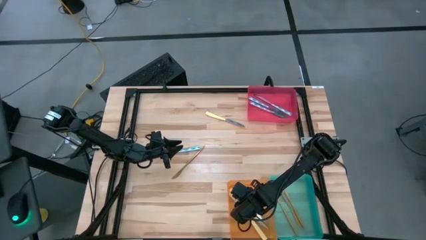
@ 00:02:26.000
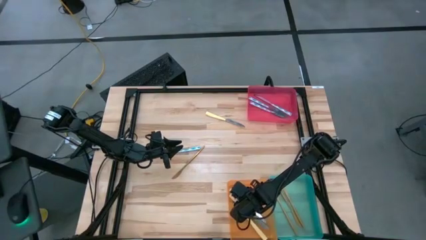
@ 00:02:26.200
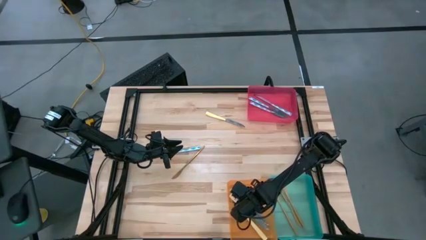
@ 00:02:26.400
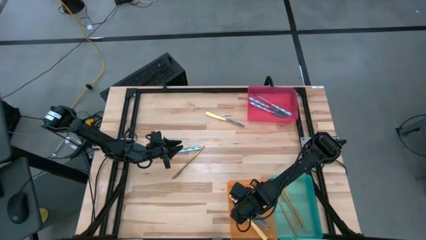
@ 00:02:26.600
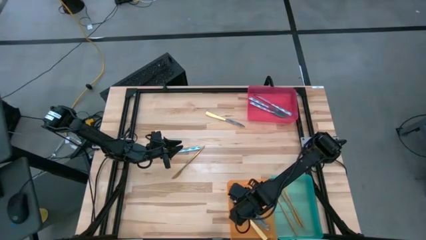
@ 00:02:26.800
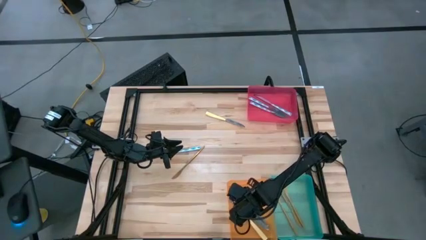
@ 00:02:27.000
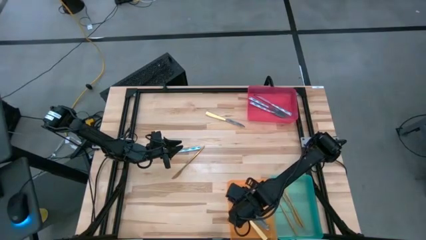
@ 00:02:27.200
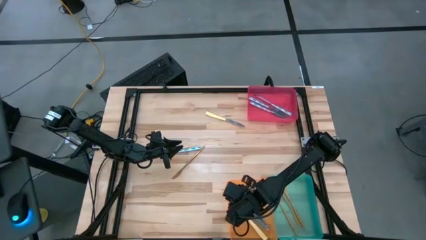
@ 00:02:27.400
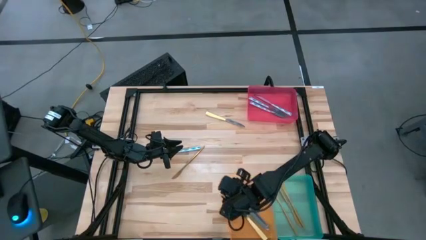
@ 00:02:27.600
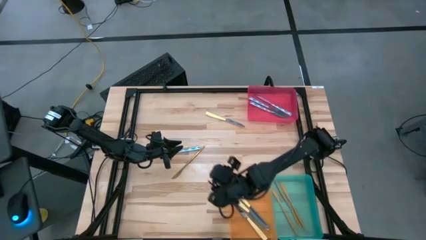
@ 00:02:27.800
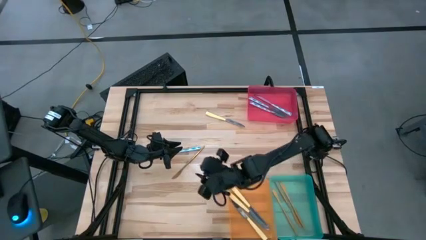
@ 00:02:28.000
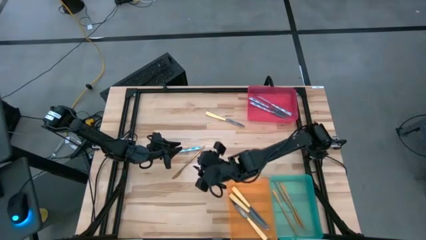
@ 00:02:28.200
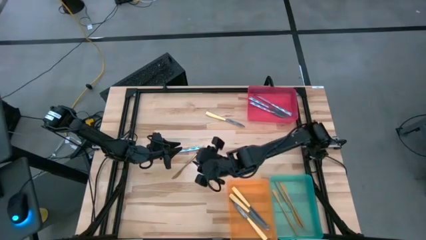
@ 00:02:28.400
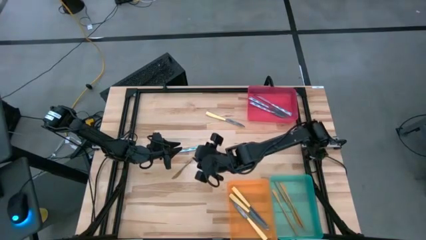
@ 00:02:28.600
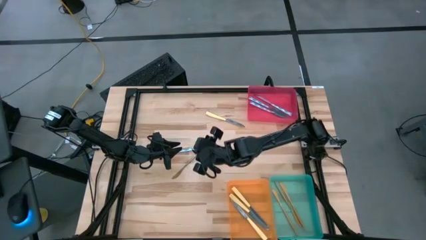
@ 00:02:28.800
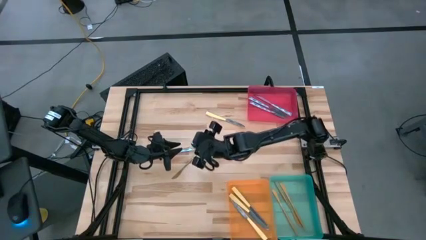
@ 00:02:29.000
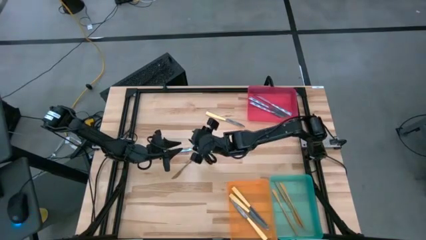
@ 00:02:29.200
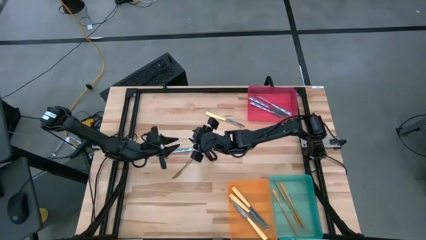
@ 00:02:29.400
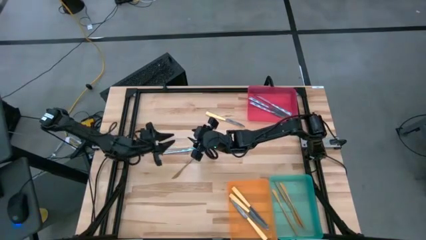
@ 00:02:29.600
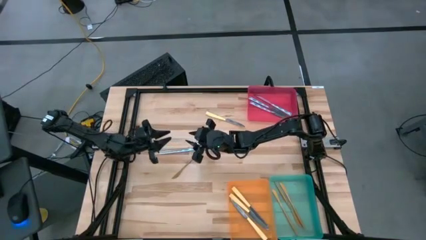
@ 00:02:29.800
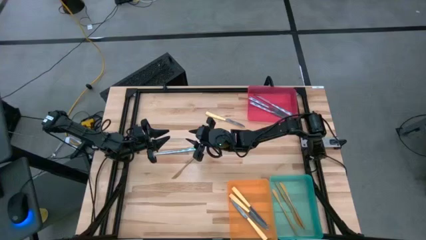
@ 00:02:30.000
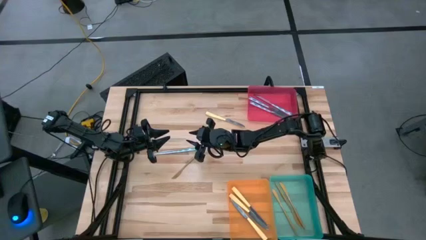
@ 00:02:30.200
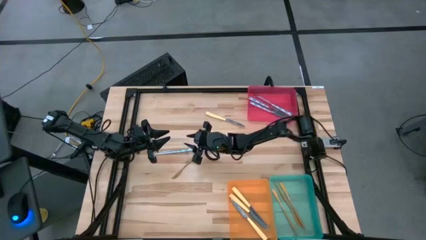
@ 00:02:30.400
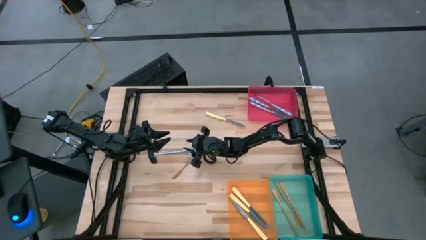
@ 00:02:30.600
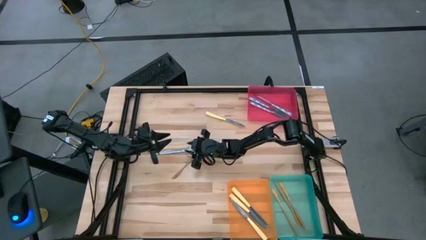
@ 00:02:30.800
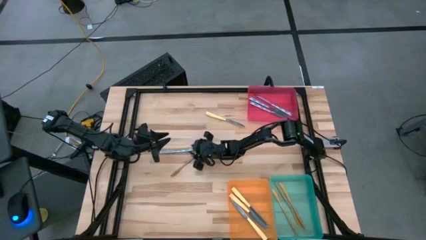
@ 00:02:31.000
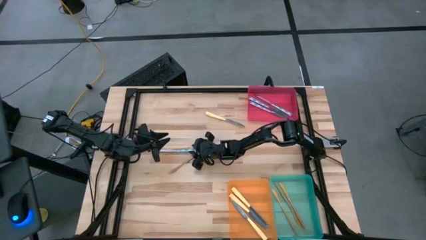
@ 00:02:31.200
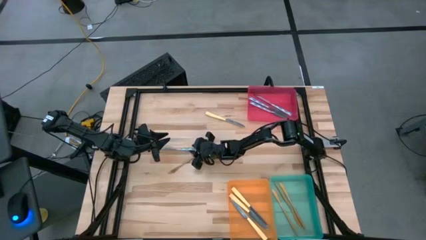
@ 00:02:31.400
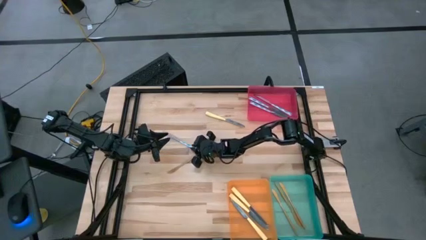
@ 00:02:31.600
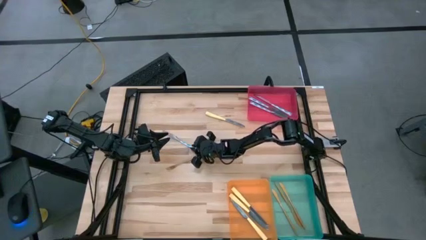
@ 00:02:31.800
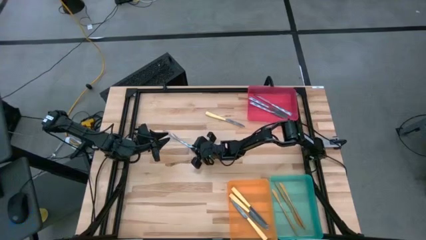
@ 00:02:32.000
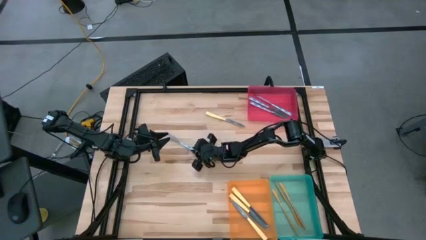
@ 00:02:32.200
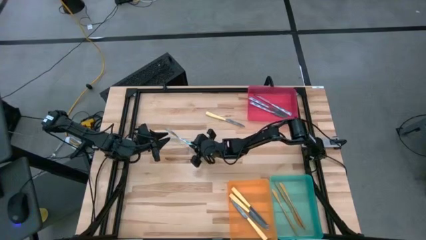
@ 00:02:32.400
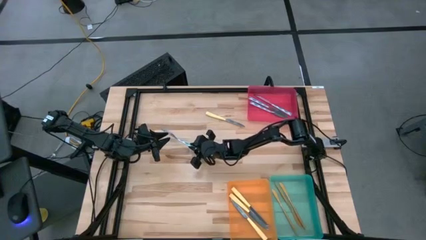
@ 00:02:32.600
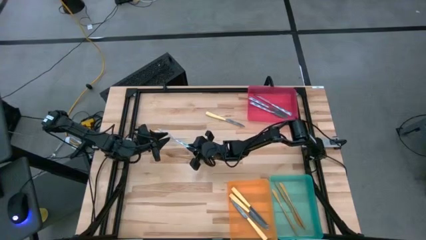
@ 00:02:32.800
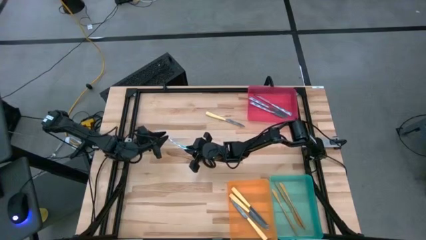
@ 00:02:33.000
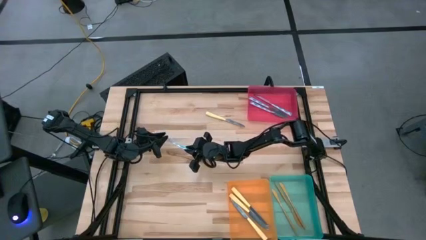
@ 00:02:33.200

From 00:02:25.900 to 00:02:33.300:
Task: Sort silverware by color (type)
Put the blue patterned knife into the red bin

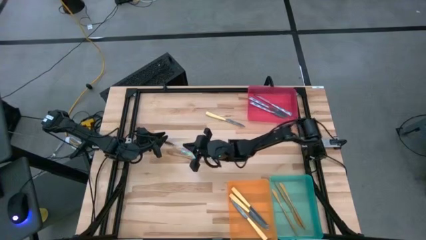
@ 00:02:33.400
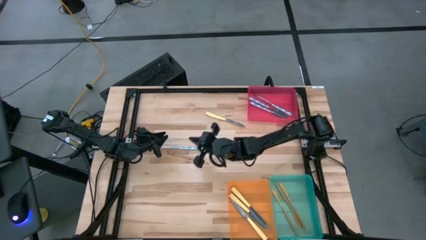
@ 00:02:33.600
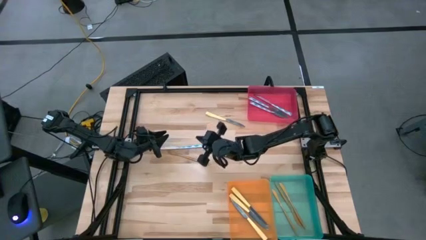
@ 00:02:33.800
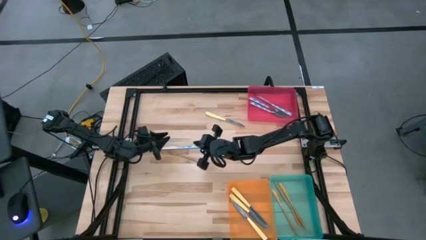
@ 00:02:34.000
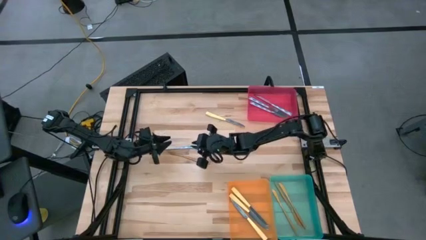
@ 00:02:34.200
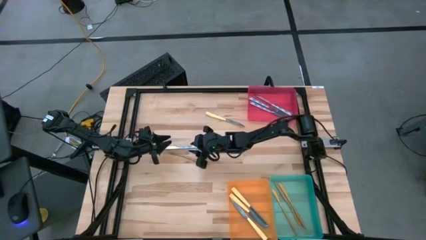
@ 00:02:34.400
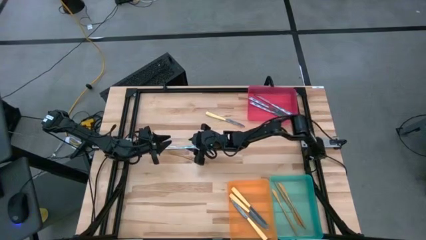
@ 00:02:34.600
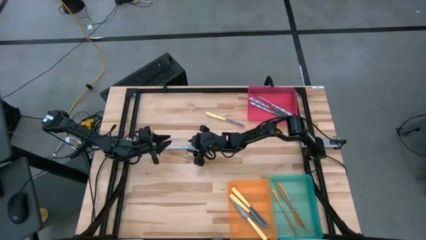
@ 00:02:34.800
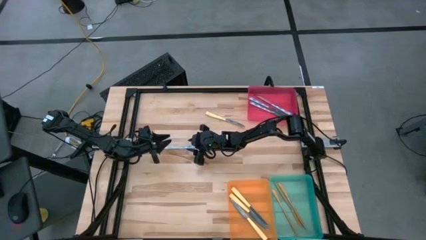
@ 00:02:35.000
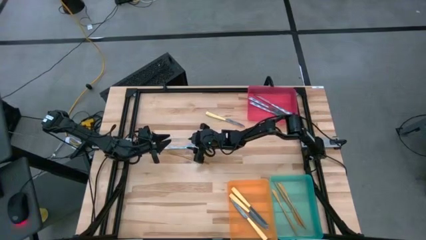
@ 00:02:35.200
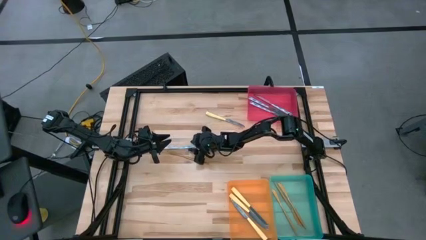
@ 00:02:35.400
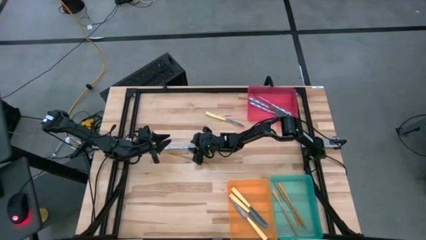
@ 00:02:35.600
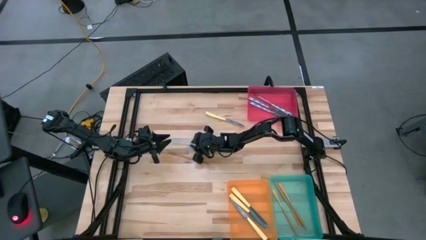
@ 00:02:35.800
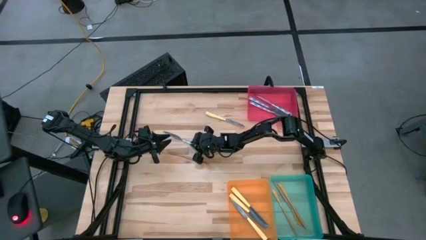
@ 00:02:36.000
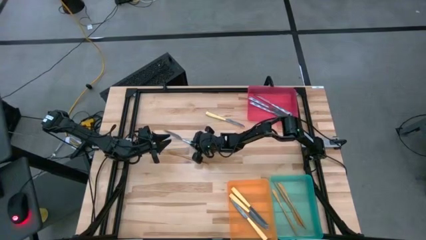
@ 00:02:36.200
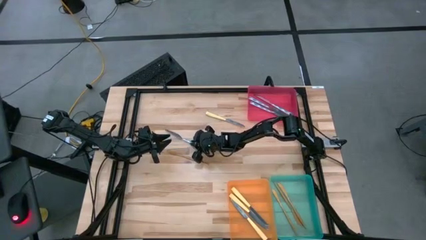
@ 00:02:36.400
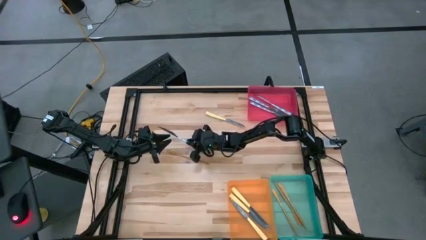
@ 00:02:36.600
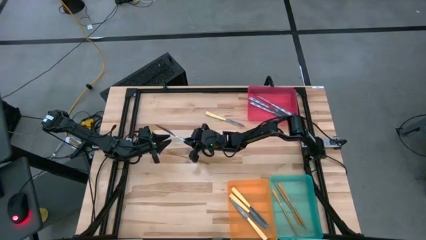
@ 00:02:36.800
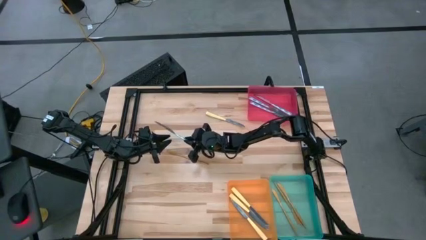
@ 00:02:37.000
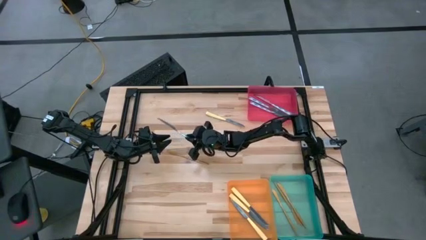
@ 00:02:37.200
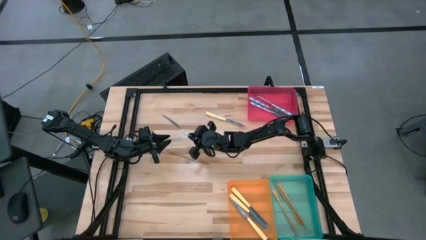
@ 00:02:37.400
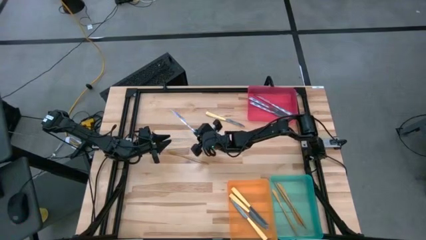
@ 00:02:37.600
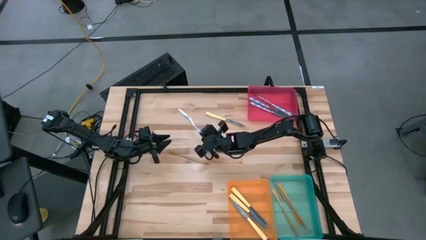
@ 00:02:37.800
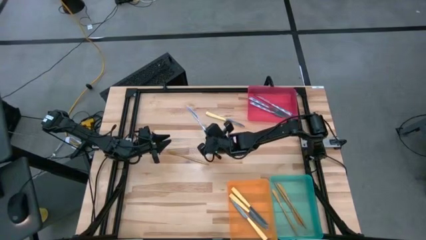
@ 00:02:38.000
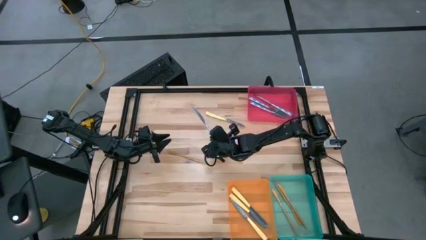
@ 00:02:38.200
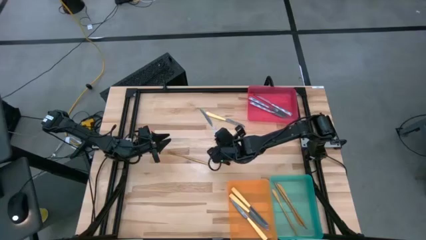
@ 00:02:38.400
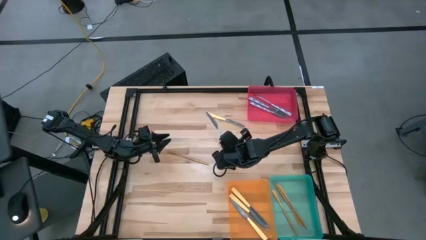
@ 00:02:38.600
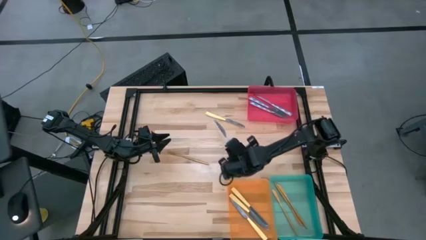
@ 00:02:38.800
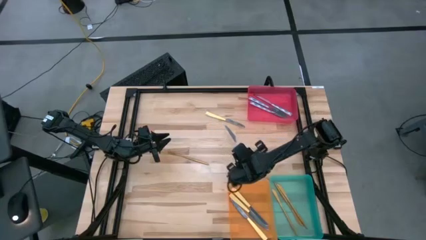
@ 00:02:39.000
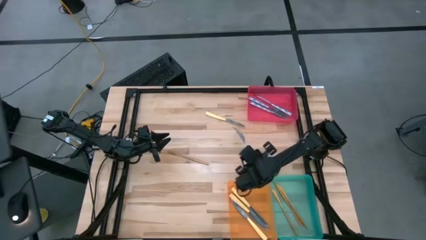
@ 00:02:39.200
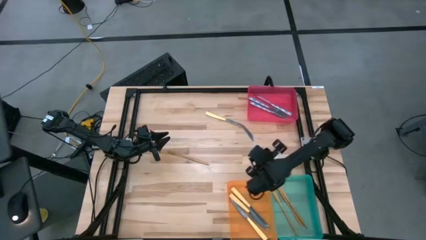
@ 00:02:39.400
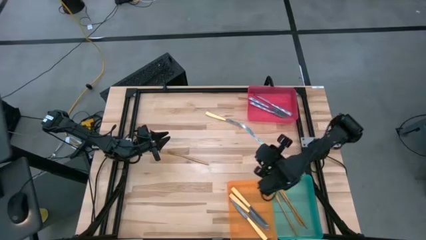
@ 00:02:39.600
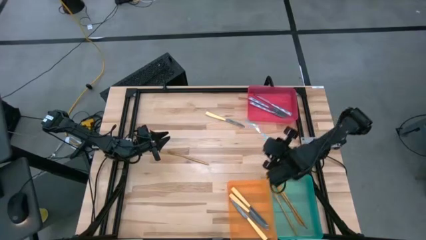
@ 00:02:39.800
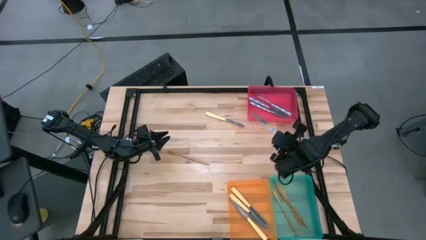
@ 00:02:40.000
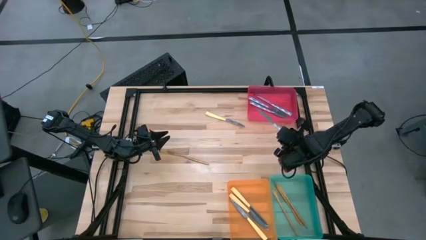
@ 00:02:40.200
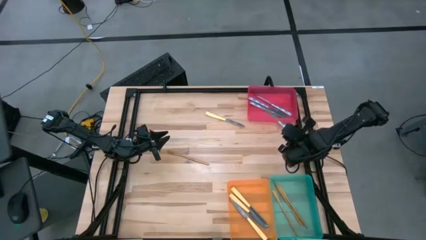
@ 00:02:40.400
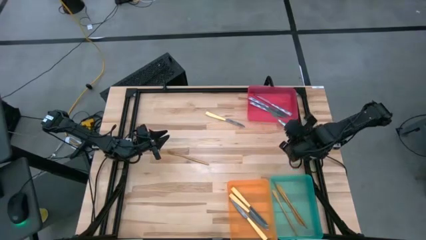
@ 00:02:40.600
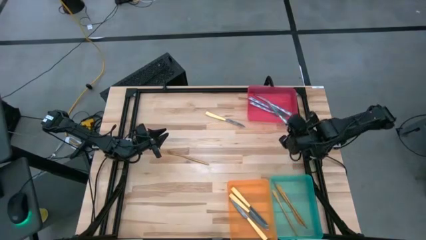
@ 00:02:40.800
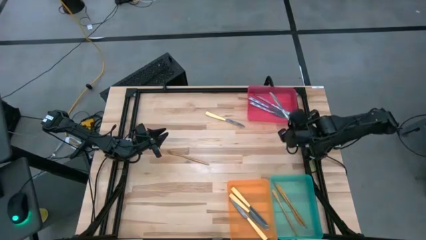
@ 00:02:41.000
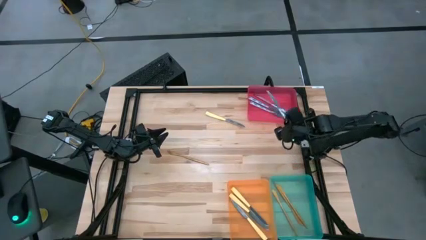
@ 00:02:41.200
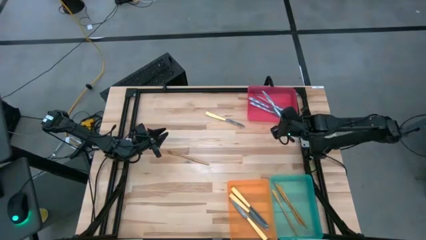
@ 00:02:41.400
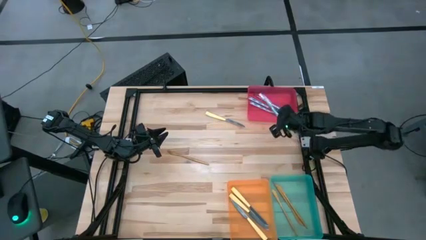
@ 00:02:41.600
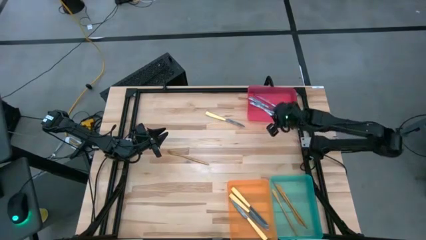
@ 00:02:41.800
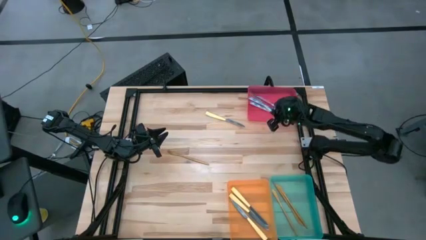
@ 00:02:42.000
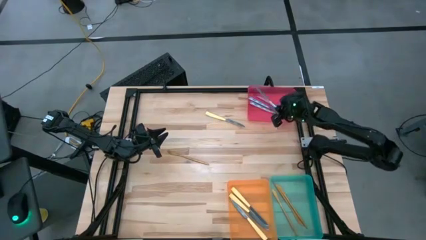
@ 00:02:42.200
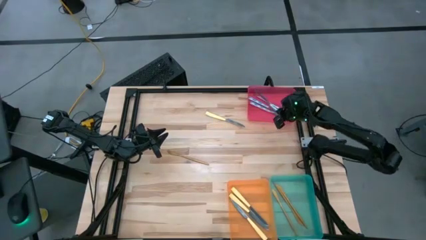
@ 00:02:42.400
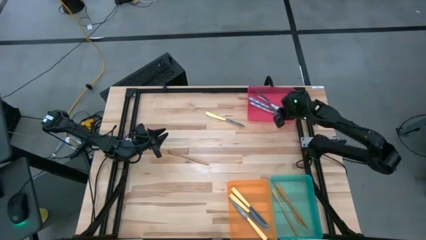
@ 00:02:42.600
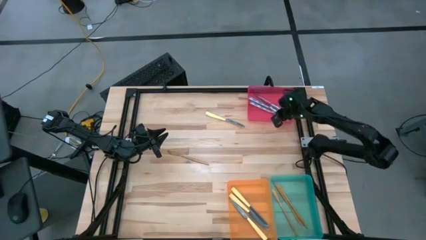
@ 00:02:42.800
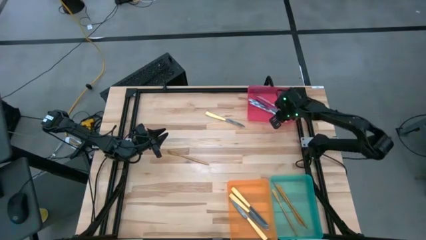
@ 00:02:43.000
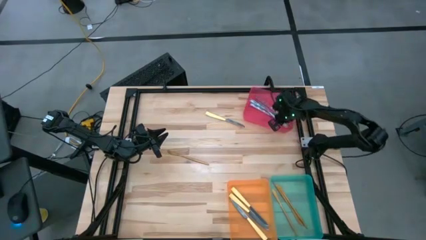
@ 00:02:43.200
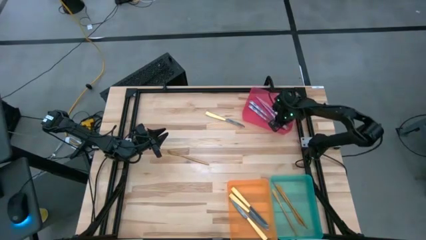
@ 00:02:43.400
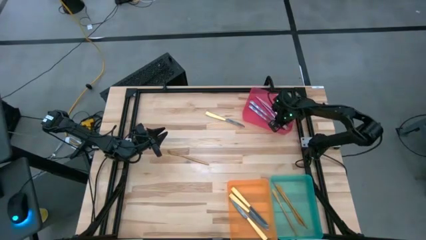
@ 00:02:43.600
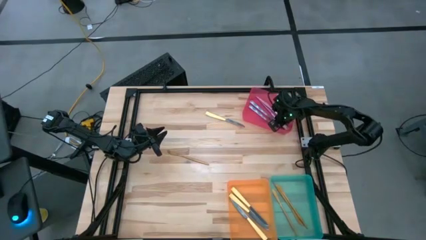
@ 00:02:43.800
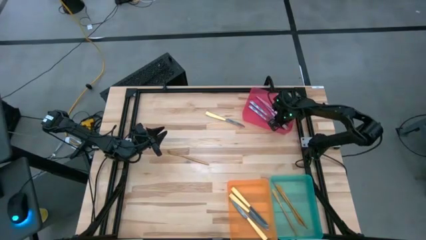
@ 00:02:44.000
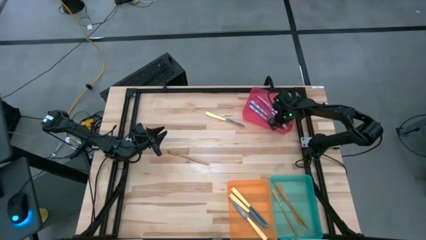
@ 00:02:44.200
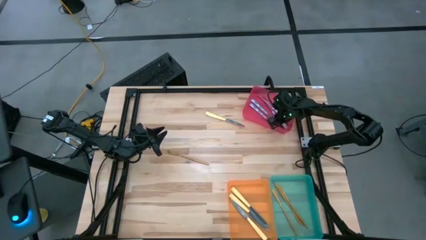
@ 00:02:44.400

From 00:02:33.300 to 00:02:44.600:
Put the blue patterned knife into the red bin
